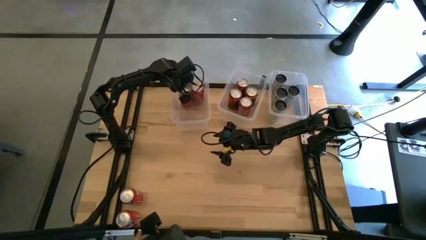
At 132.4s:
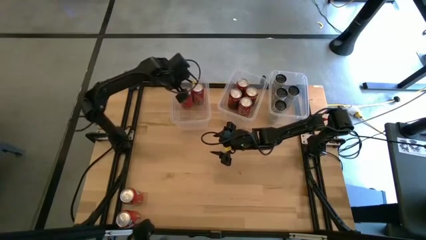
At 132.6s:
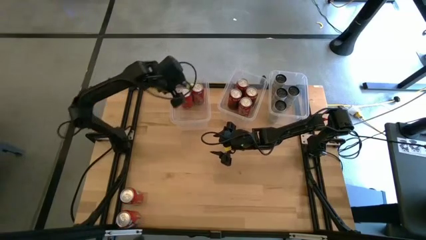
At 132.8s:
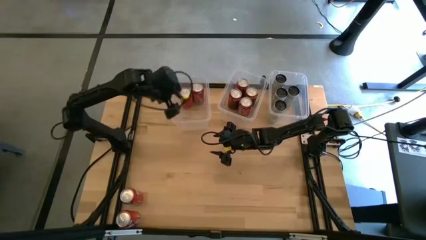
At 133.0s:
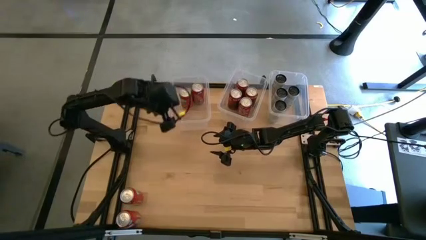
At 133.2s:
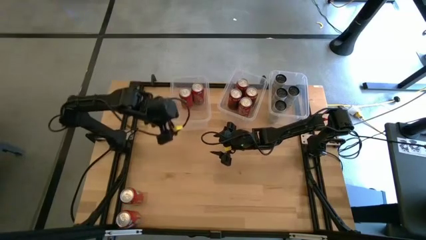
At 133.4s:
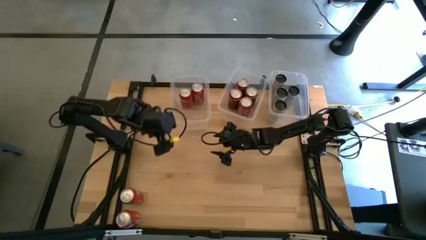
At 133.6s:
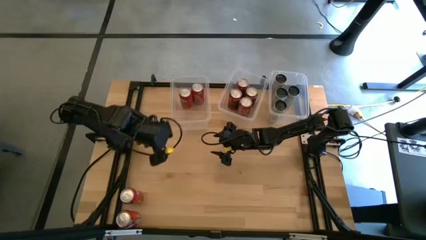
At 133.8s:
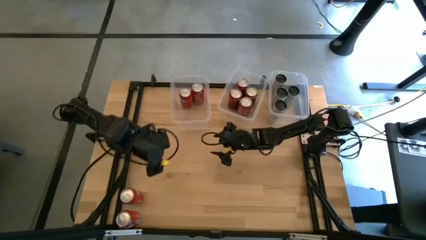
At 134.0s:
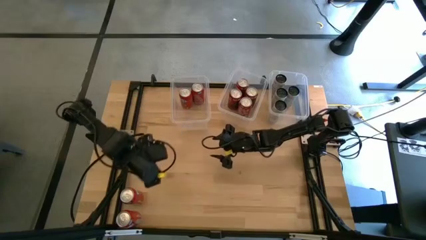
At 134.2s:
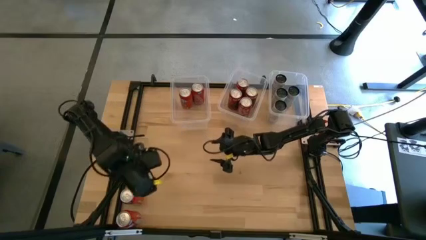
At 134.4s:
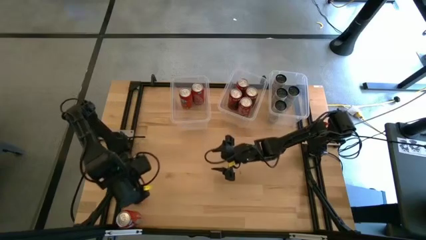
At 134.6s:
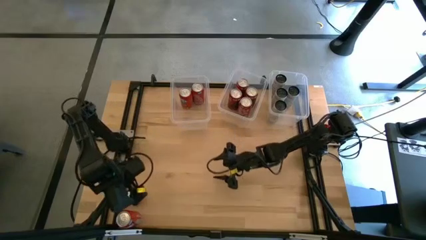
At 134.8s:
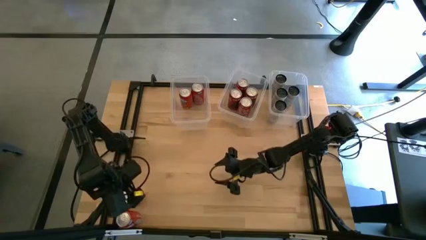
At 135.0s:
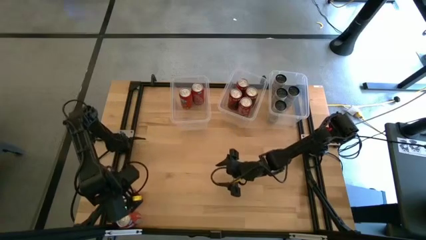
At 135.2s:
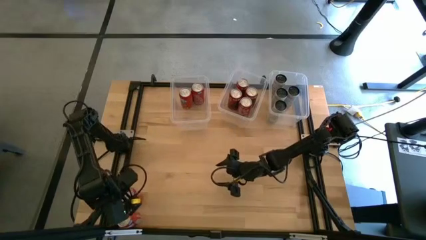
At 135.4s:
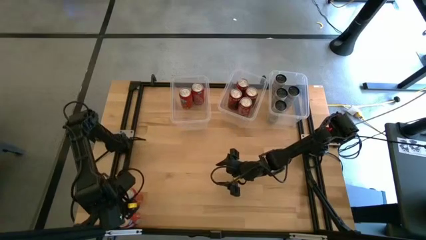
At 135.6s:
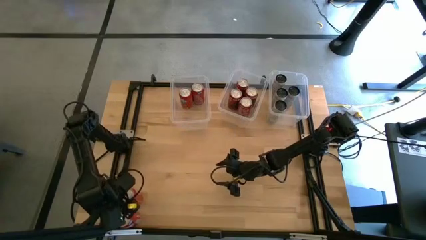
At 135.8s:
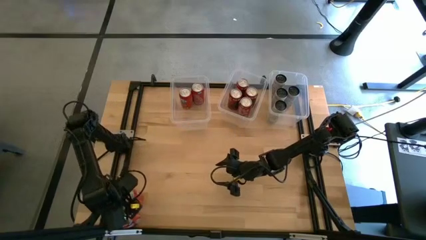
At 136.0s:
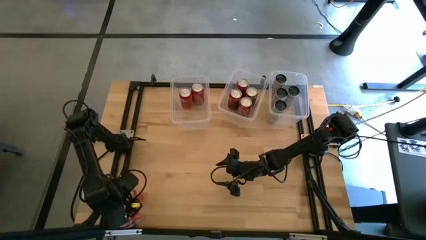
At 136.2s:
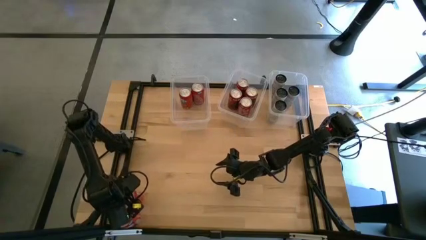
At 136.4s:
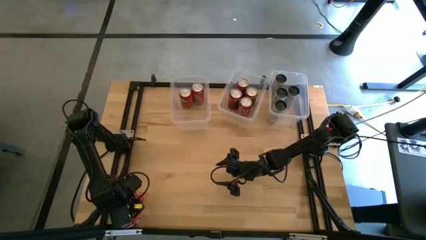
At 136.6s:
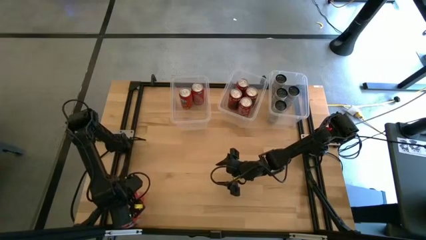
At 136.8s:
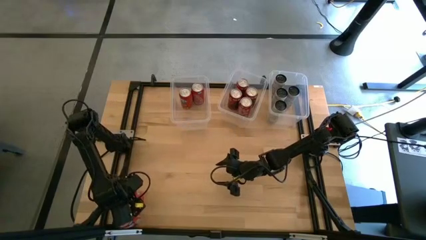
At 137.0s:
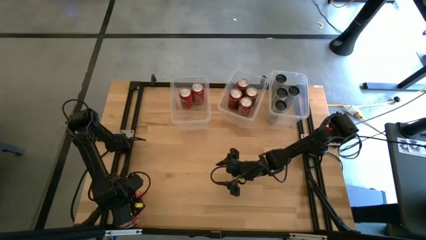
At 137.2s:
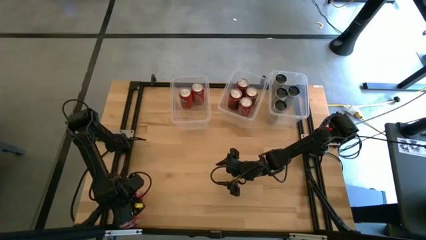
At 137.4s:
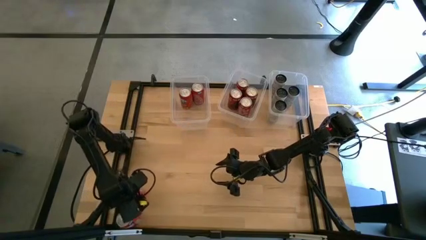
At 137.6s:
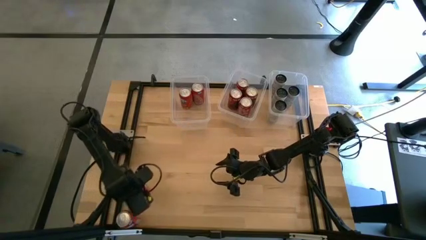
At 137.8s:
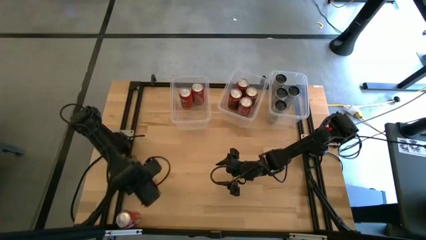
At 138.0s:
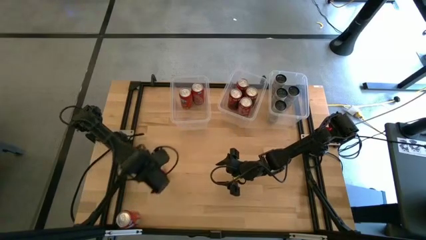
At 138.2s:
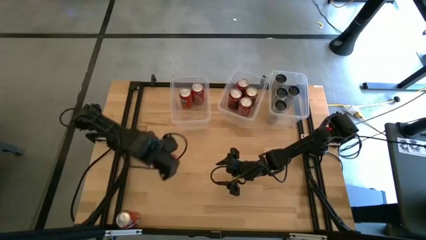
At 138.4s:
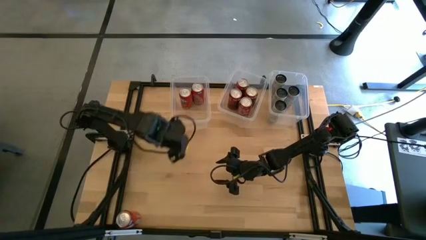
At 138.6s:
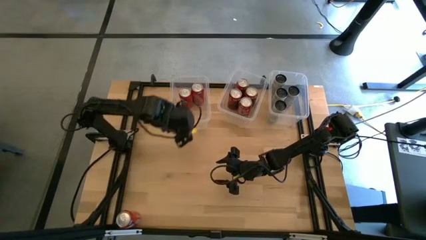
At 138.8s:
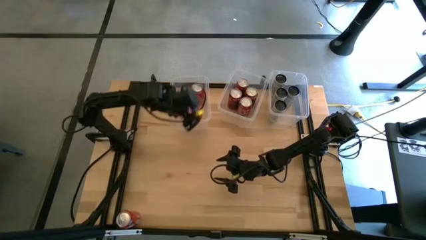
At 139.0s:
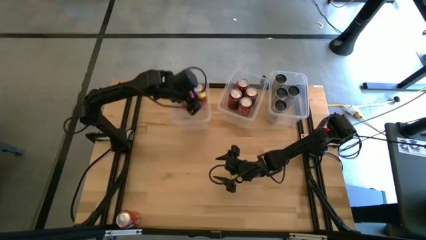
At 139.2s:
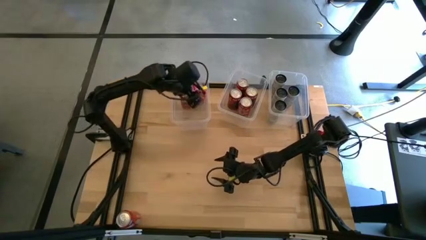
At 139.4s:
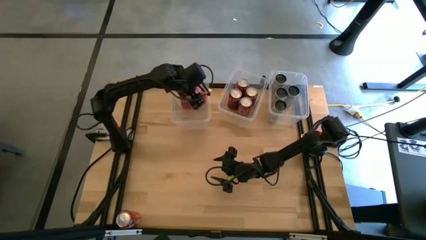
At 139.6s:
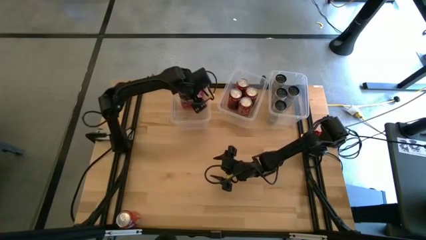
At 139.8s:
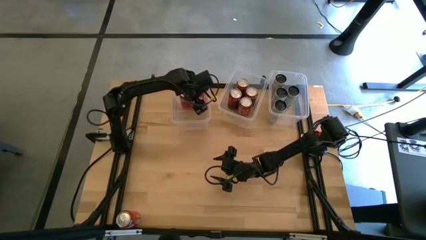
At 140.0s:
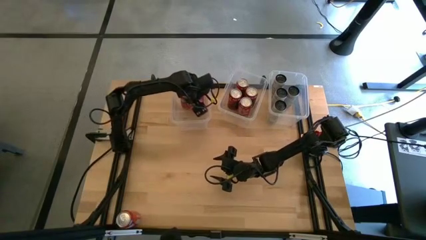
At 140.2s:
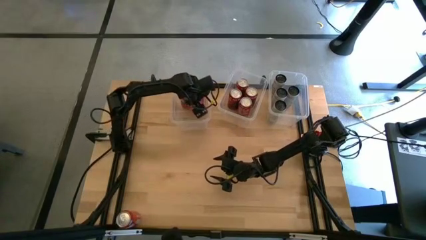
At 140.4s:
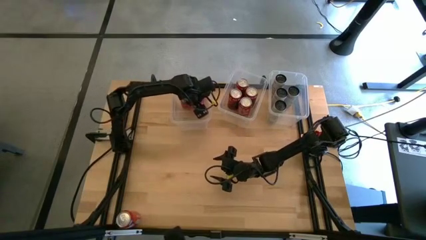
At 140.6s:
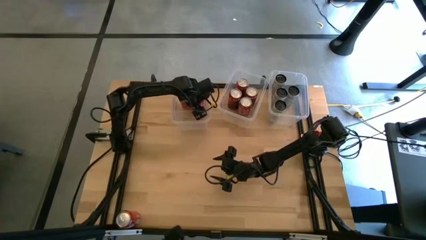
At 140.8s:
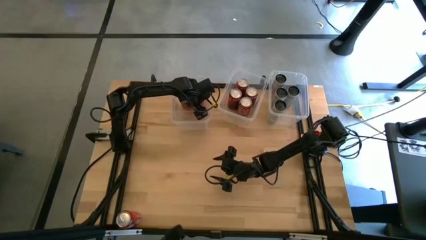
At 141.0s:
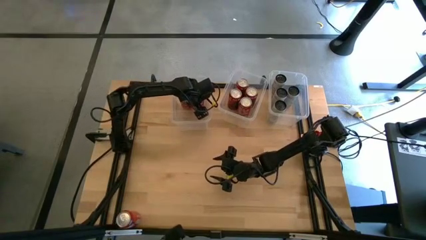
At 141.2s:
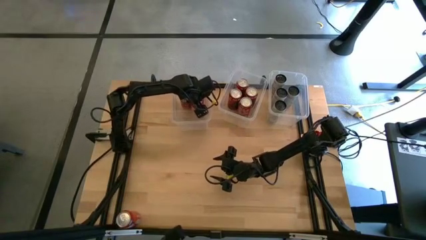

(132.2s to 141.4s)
Task: Sort soda cans
Put the top orange soda can into the left transparent bin

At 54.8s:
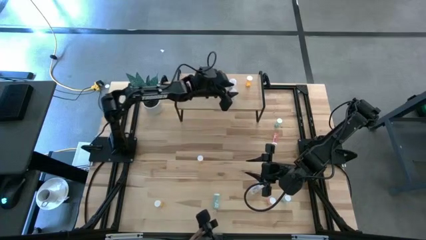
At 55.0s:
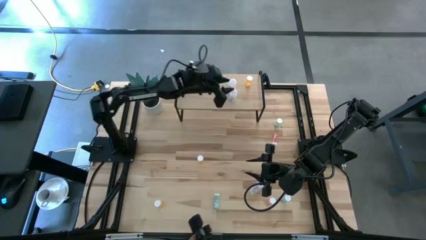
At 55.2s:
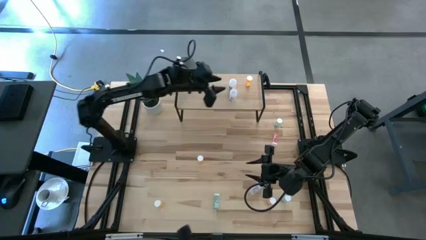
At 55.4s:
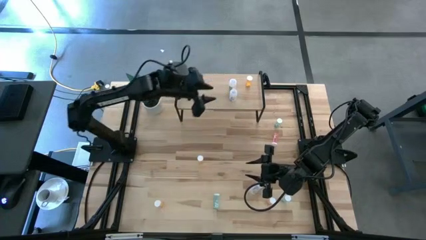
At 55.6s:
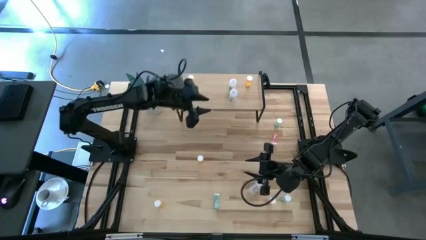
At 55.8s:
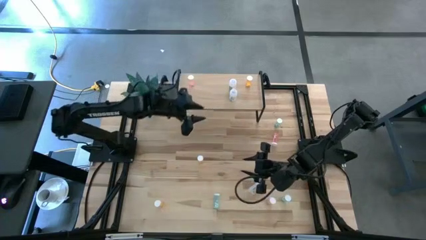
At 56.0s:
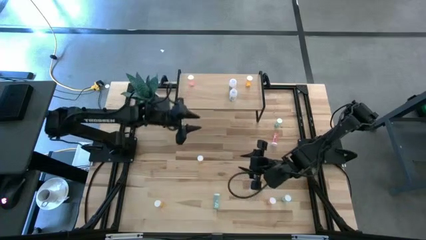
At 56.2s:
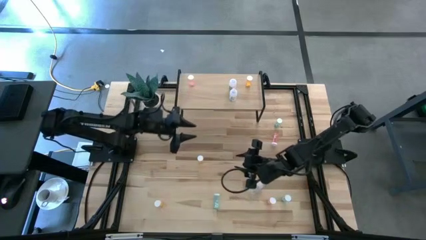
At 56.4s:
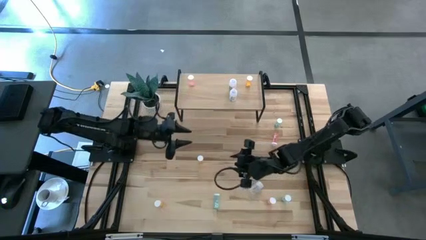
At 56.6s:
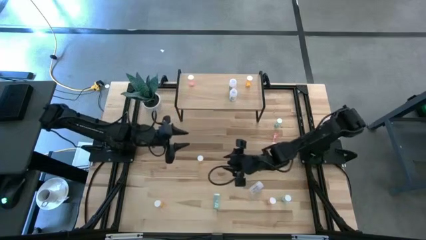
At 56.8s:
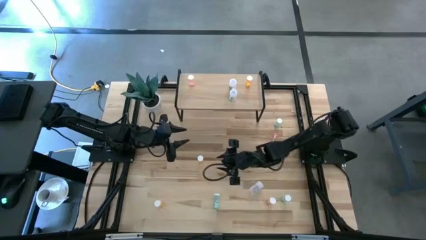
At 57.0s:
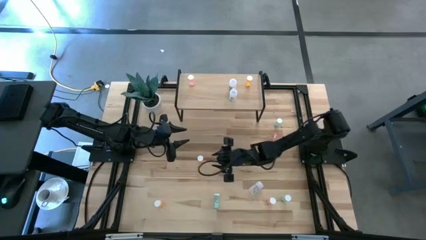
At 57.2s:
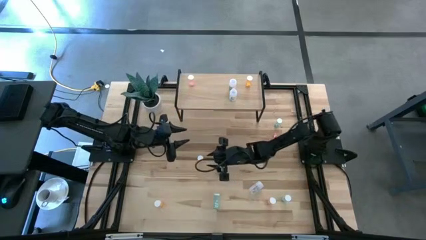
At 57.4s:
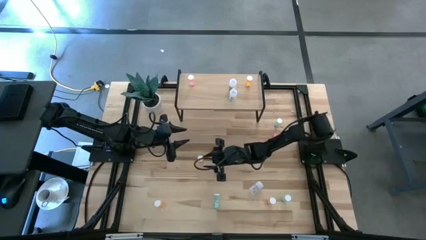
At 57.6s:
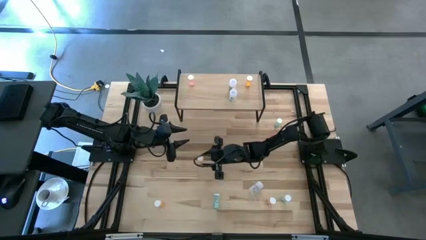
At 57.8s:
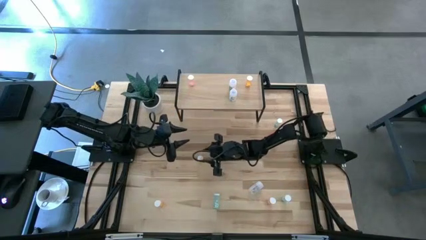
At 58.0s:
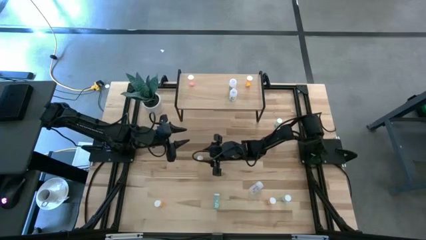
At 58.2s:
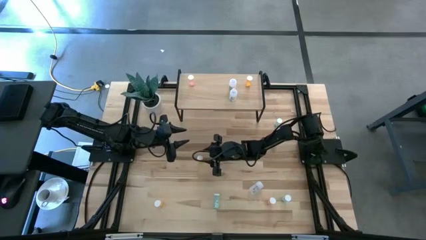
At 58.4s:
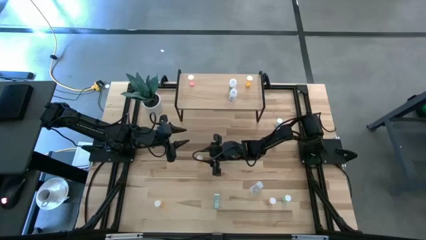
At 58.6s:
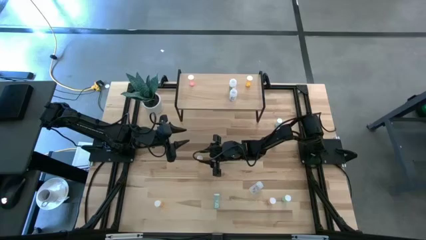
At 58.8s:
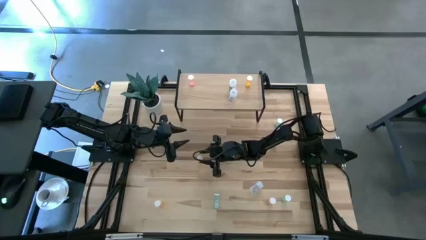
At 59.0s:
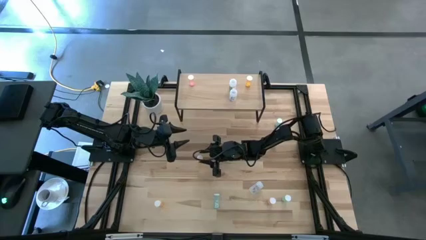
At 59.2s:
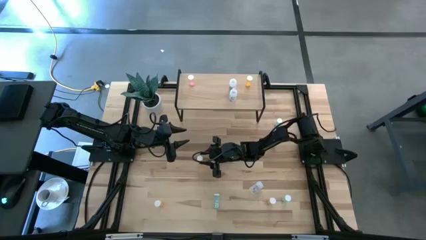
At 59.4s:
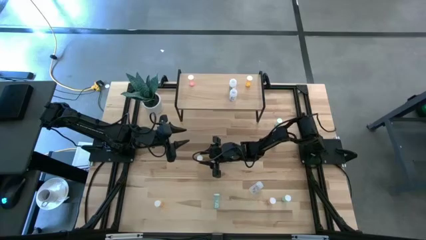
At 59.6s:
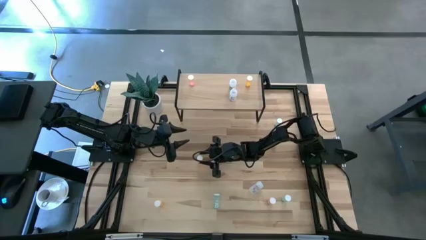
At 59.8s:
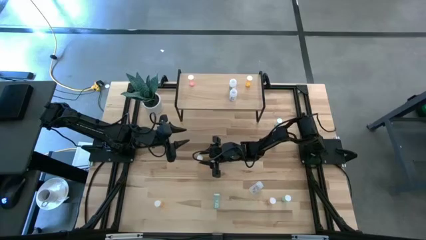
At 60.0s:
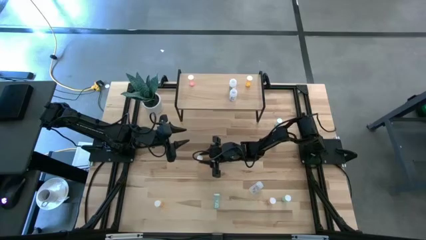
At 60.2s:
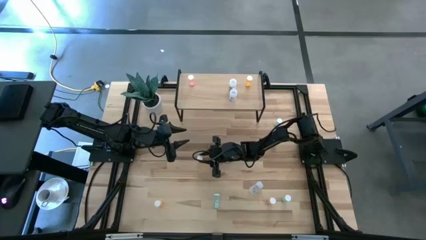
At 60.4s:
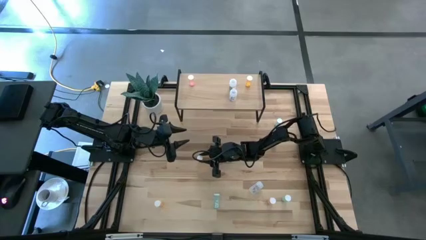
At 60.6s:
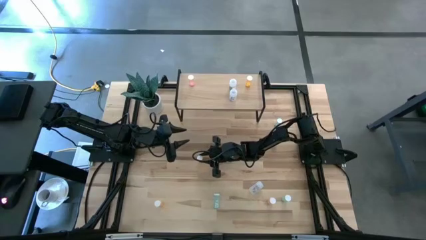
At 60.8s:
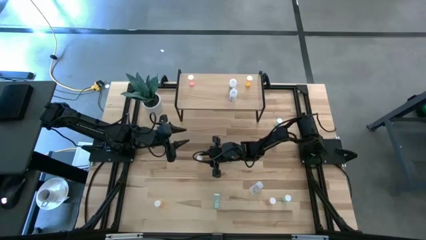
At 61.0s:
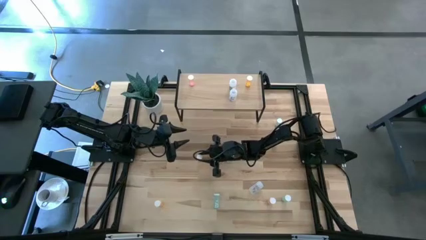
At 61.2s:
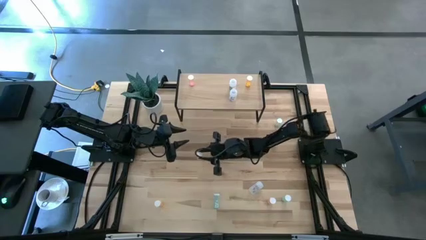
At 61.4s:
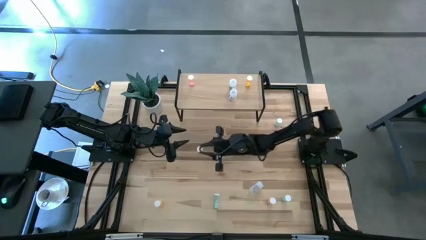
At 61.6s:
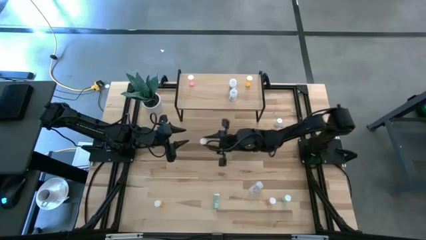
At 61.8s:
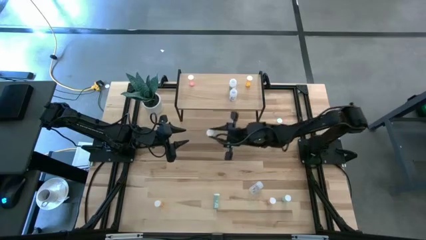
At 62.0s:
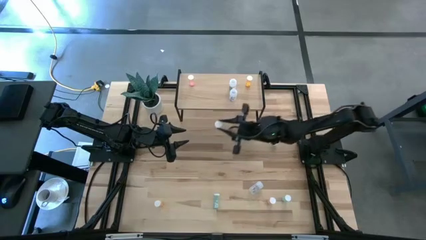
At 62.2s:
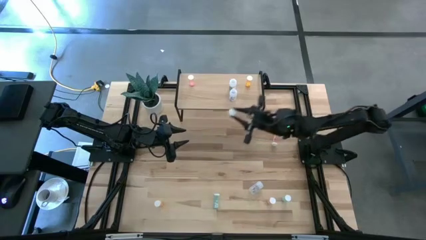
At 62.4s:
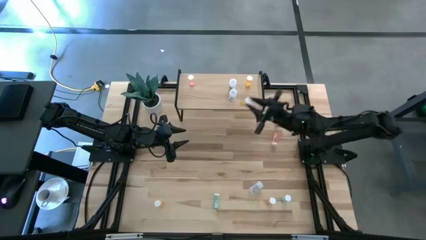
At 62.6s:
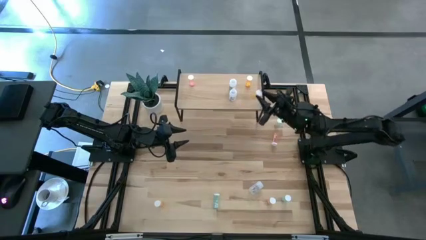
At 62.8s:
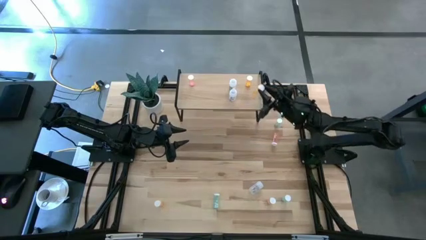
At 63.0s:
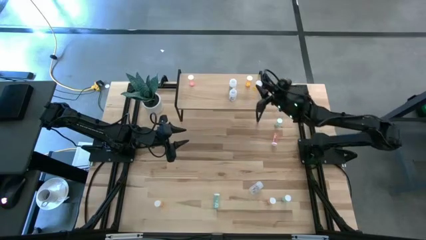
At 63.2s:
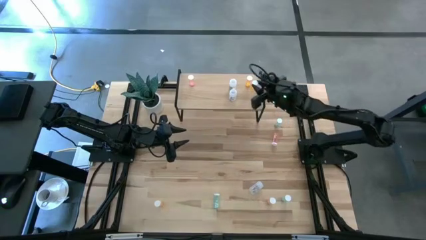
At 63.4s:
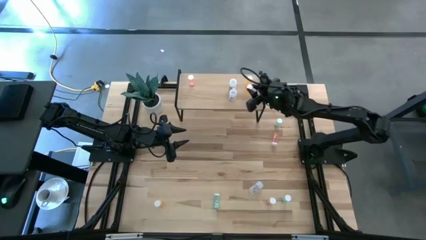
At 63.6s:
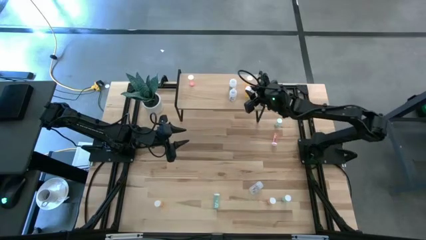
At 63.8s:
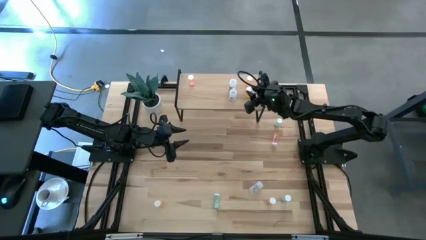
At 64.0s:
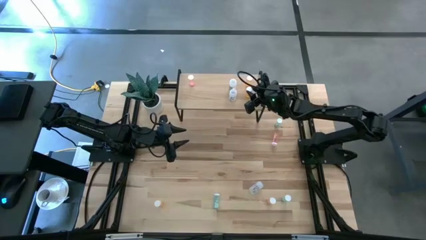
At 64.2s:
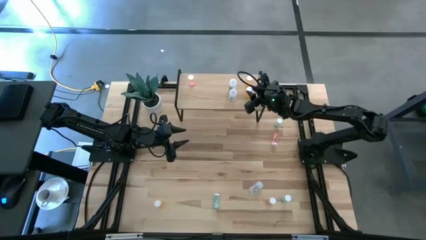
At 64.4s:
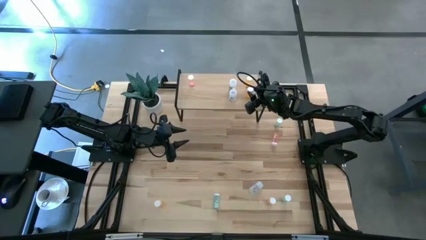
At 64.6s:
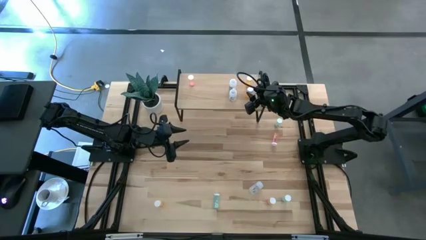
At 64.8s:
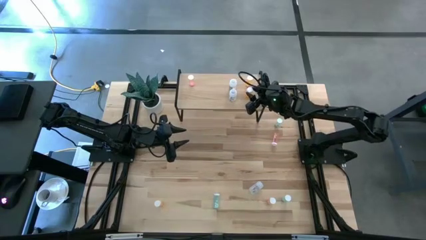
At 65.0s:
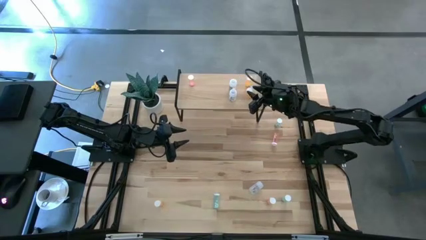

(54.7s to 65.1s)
Task: Pick and place medicine bottles onto shelf by color
Put the top orange pill bottle aligned with the other orange pill bottle on the shelf
